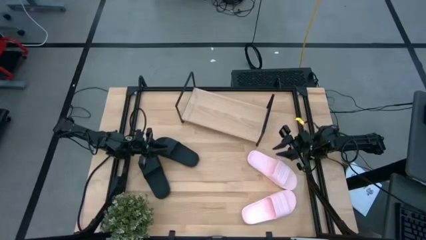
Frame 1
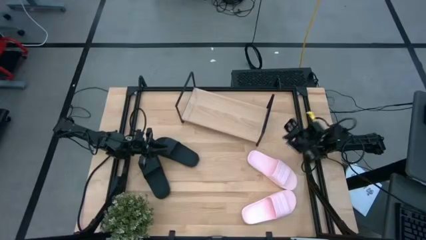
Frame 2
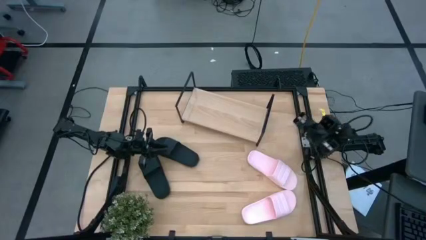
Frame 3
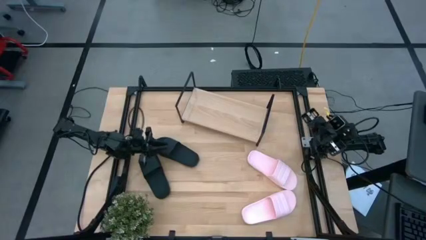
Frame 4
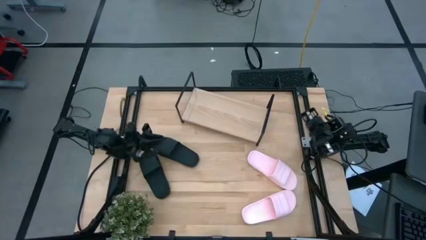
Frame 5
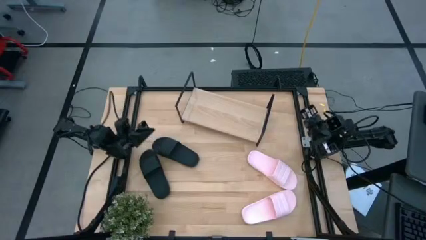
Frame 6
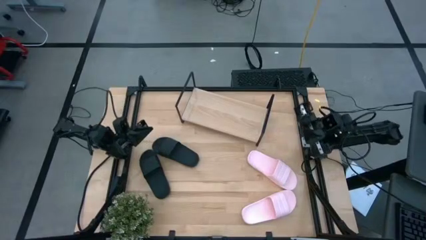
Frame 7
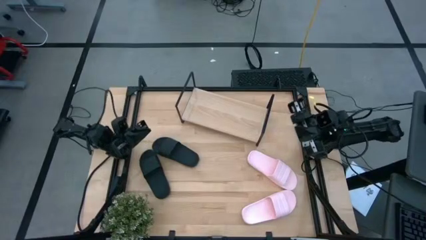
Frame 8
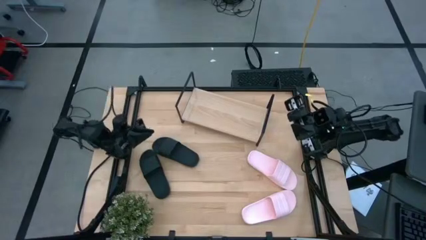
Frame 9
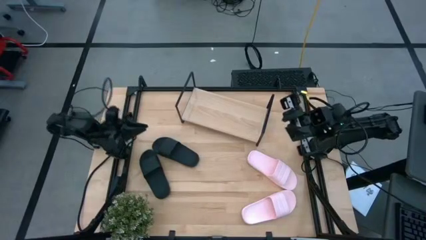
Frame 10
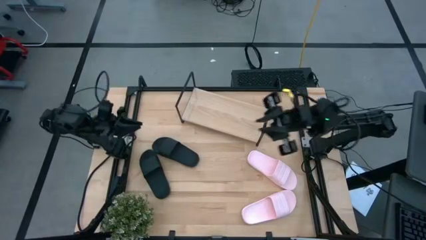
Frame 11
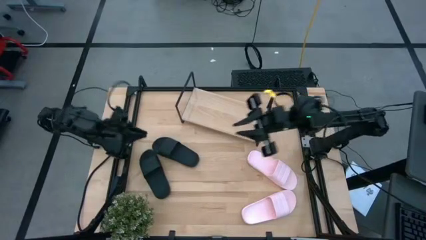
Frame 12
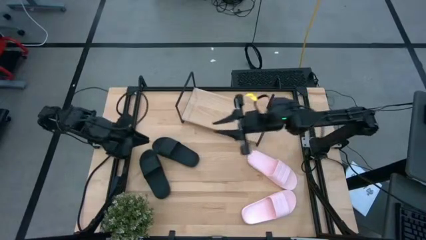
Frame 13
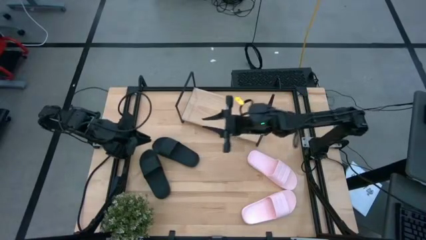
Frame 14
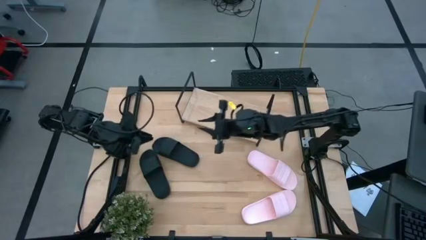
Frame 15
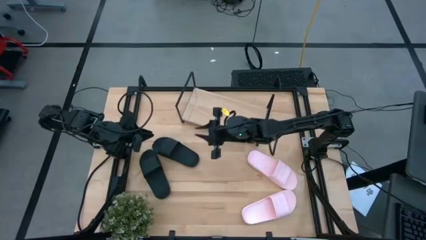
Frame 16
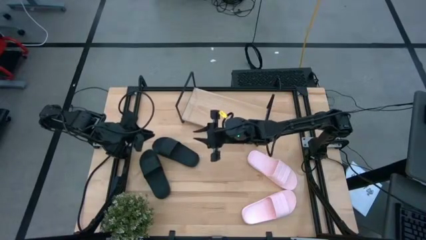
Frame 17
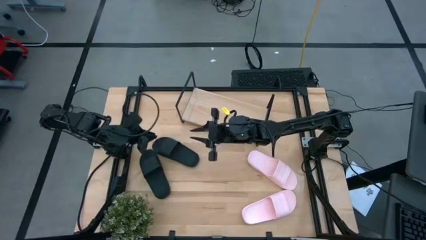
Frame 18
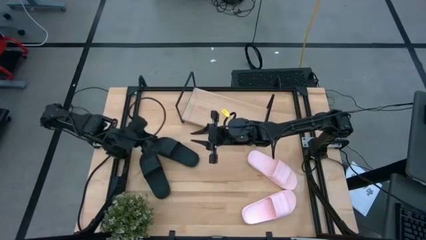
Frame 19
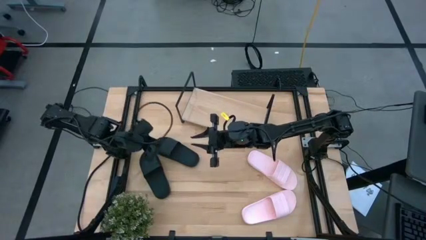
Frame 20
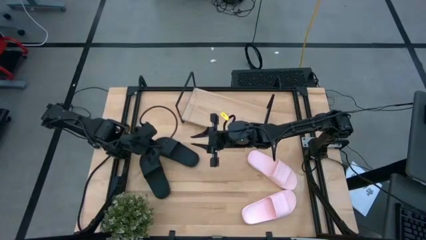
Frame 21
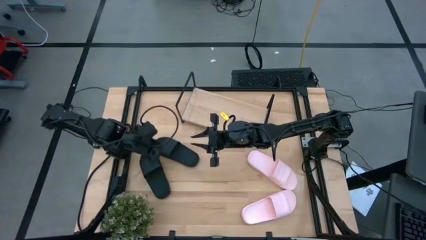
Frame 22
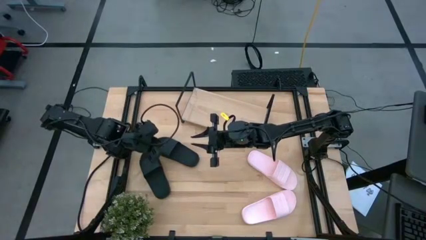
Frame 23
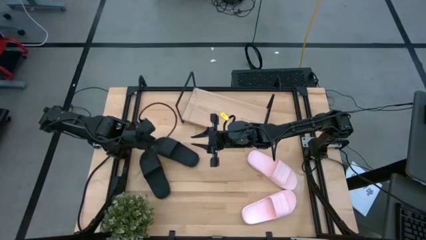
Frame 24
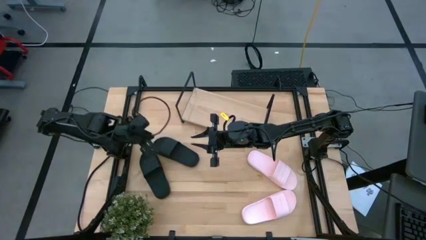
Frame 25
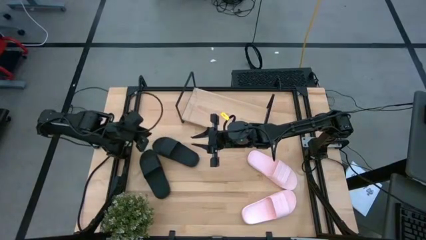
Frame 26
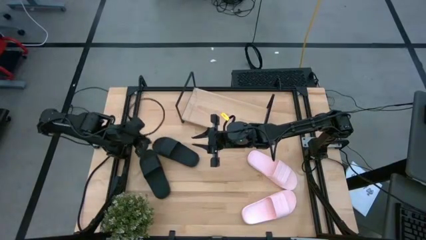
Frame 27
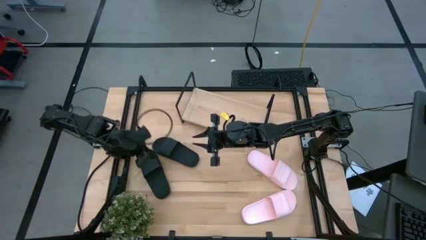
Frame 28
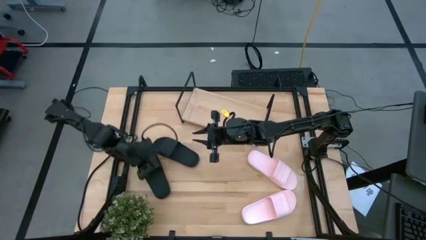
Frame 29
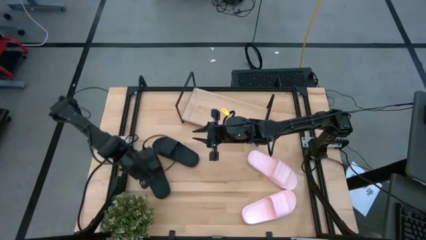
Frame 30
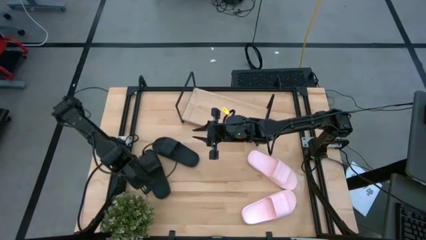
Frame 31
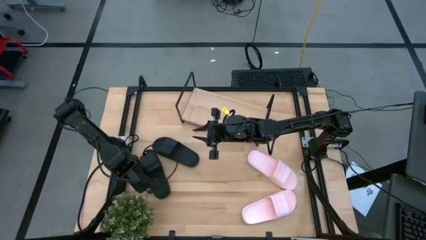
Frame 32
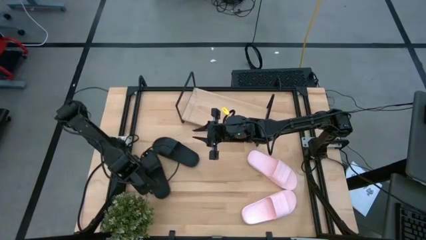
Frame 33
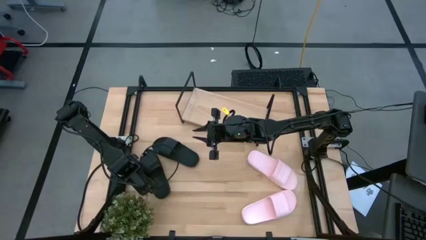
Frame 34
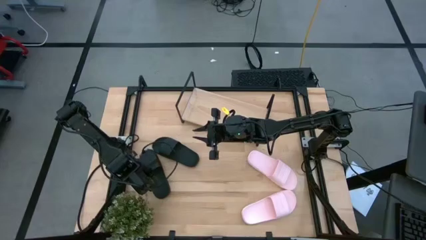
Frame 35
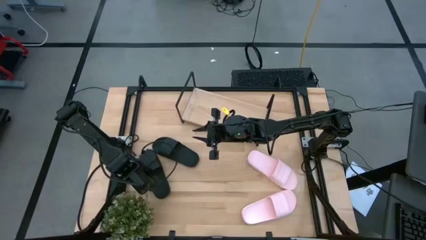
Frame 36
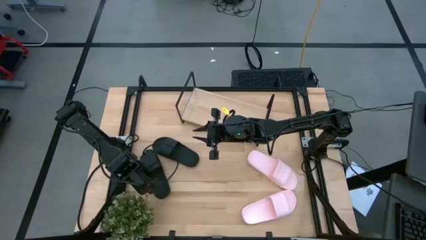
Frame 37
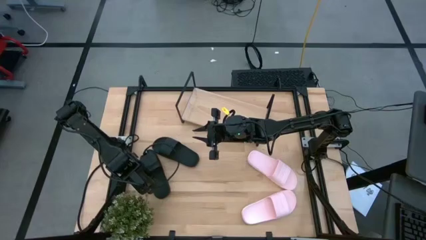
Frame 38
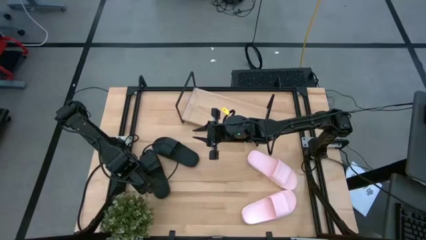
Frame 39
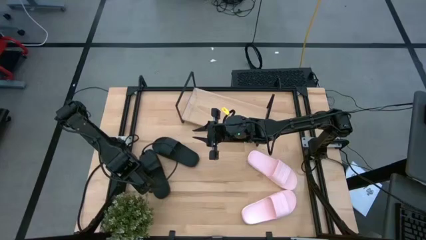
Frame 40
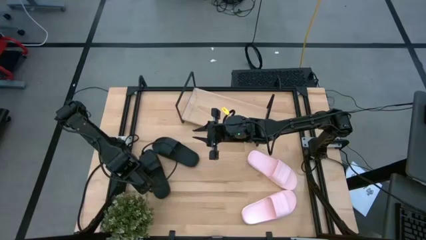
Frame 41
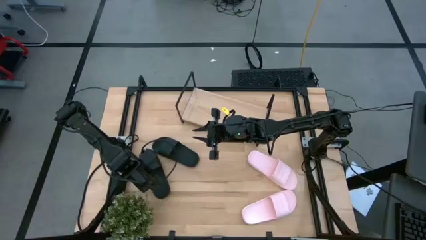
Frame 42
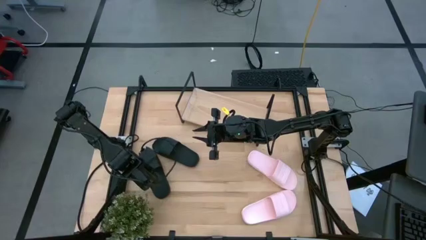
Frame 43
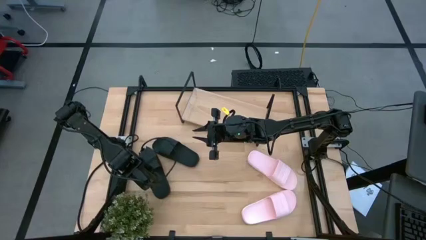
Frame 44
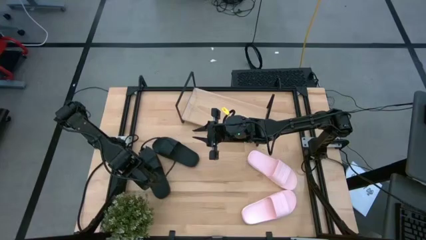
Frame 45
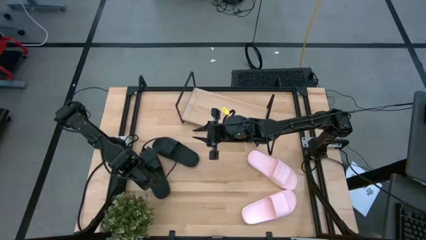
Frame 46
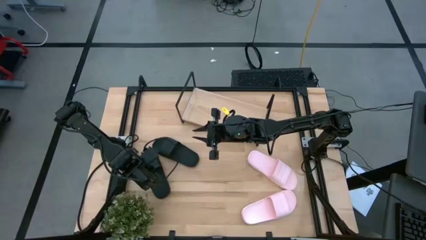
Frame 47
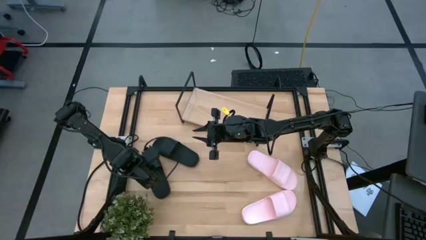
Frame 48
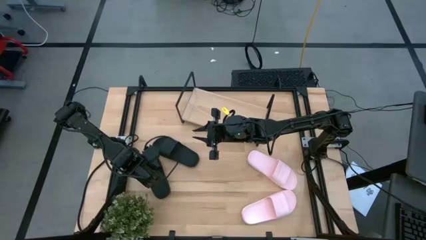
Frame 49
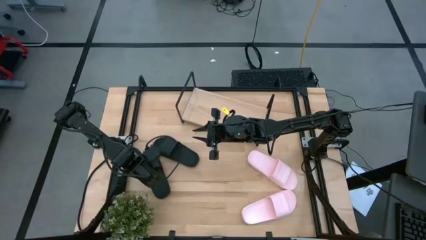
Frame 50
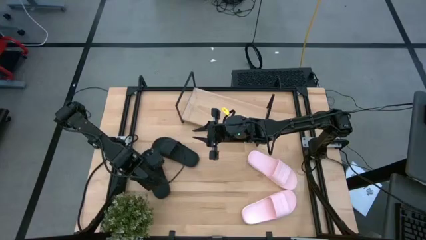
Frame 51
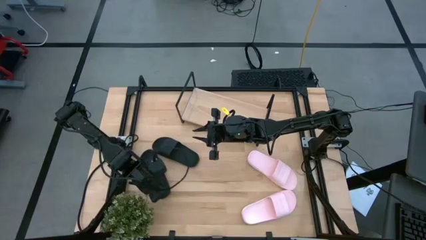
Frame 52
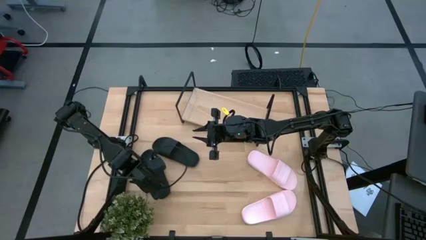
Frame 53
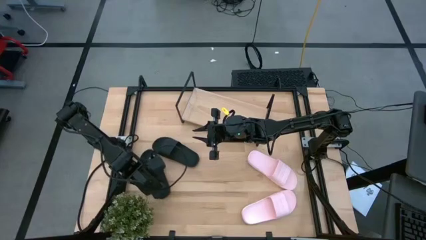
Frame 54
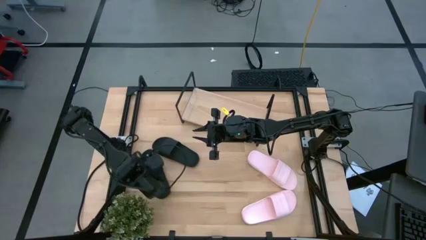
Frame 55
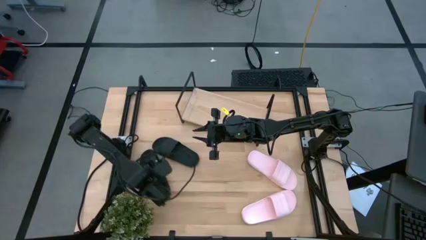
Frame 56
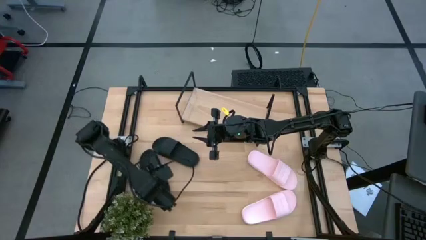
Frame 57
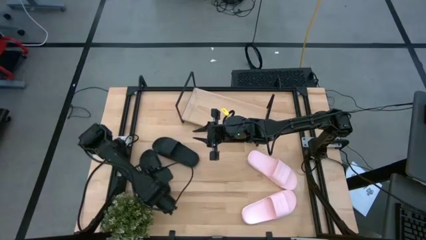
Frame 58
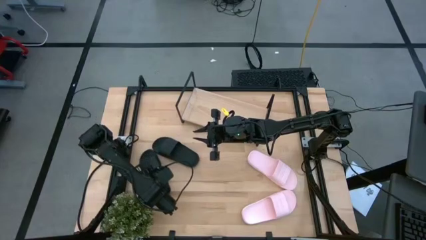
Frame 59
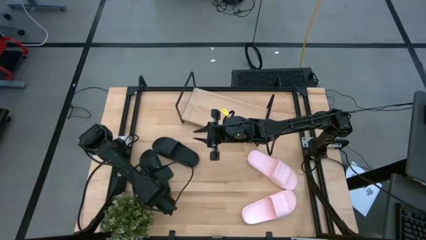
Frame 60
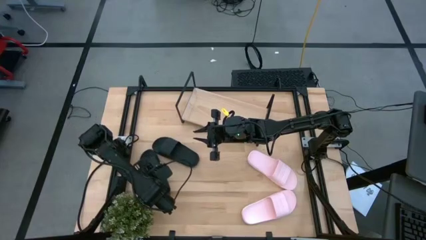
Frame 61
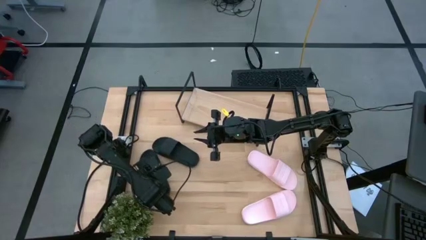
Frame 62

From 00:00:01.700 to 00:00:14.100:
Task: Pick and place slides into the shelf
Put the bottom black slipper on the shelf
